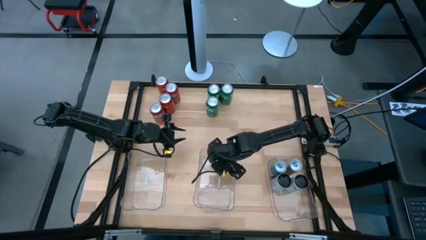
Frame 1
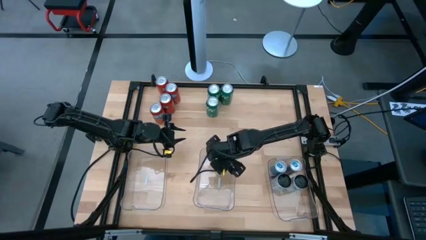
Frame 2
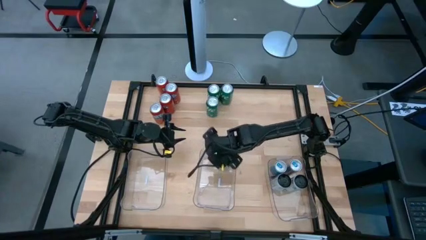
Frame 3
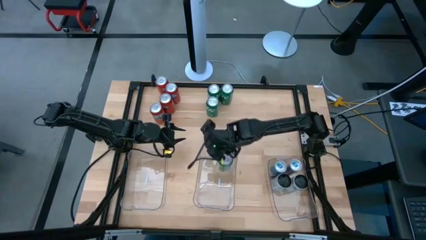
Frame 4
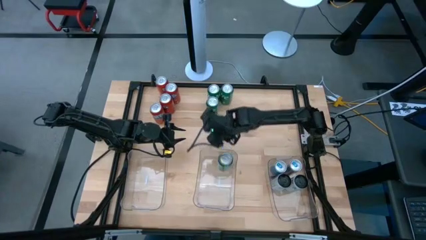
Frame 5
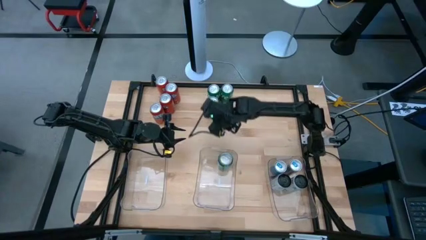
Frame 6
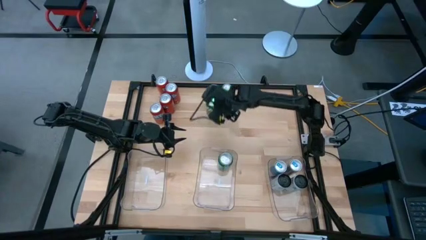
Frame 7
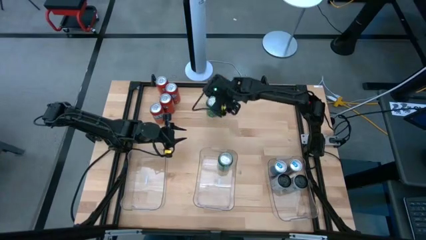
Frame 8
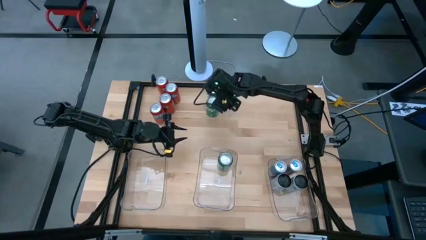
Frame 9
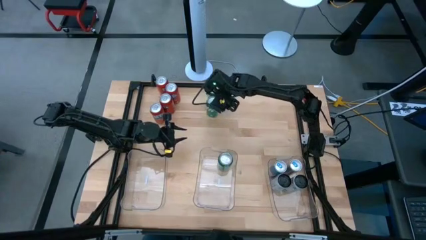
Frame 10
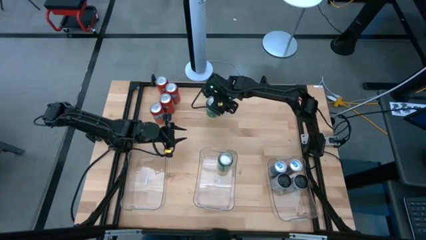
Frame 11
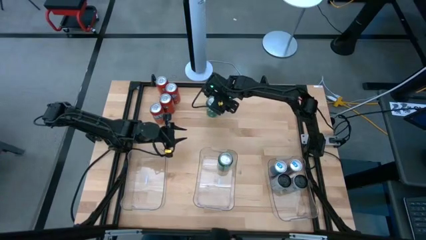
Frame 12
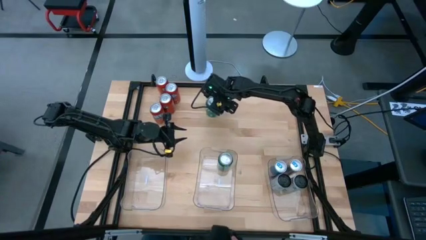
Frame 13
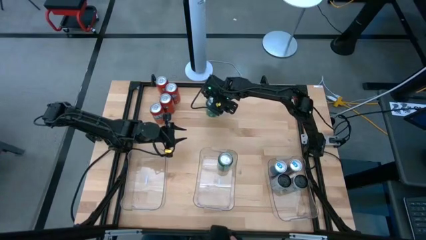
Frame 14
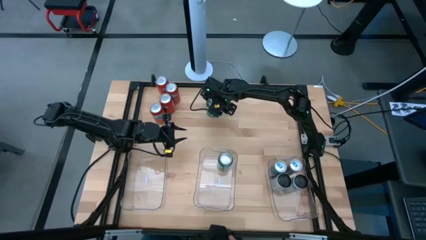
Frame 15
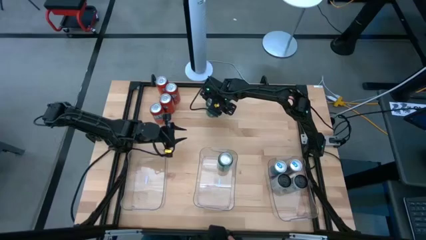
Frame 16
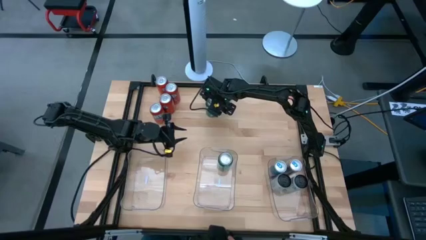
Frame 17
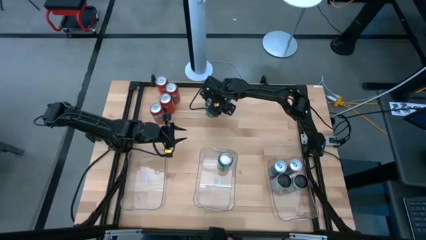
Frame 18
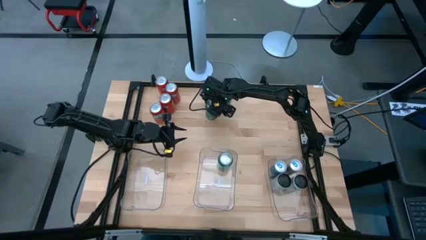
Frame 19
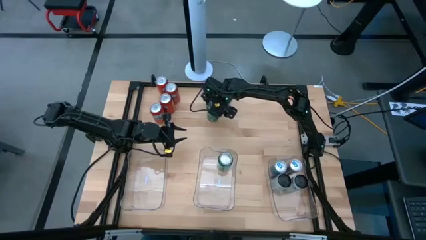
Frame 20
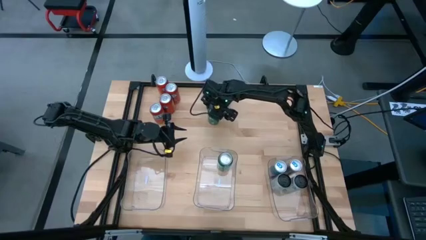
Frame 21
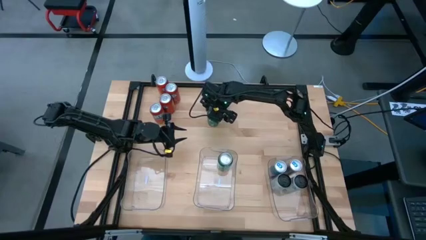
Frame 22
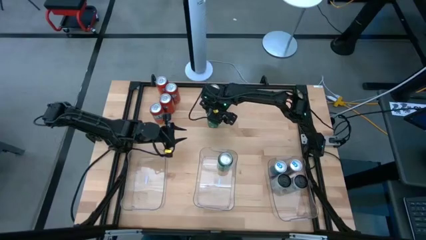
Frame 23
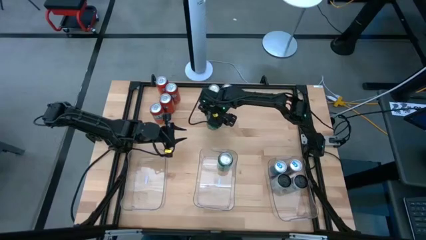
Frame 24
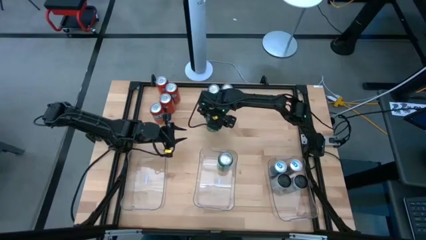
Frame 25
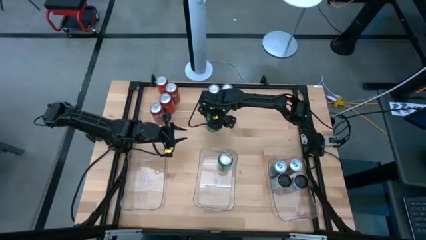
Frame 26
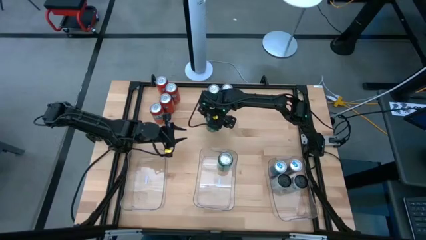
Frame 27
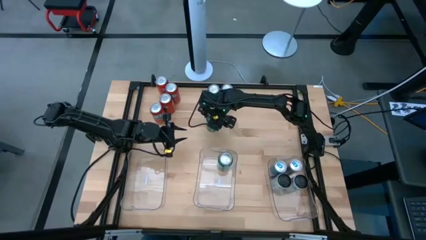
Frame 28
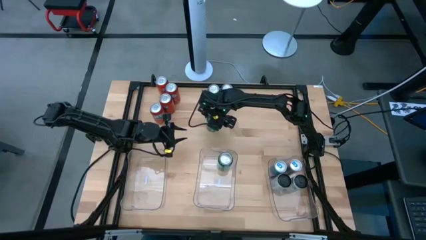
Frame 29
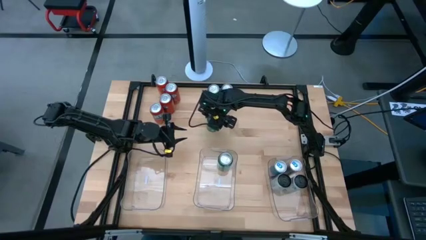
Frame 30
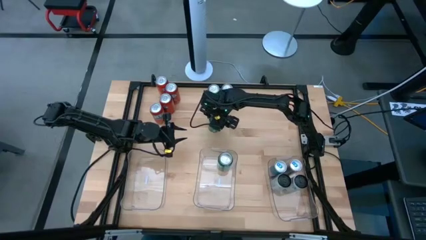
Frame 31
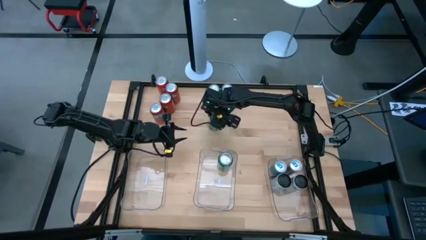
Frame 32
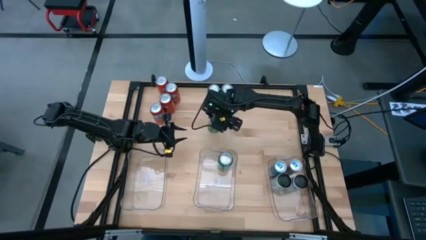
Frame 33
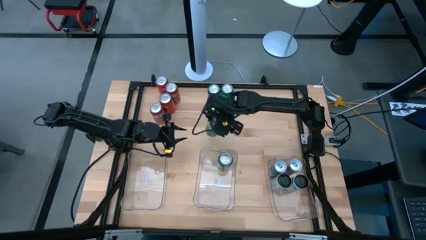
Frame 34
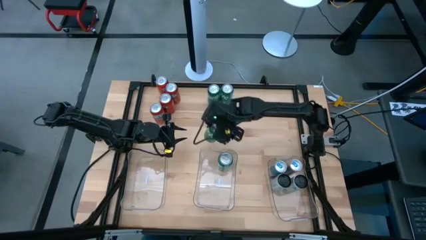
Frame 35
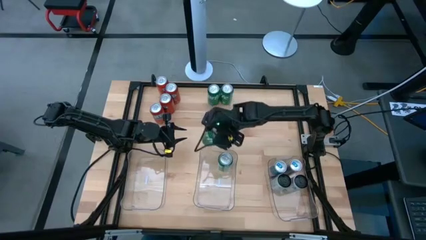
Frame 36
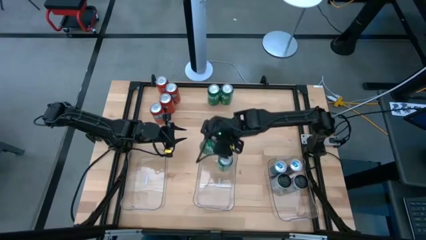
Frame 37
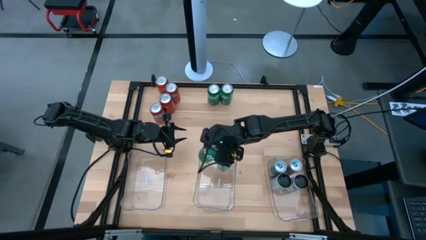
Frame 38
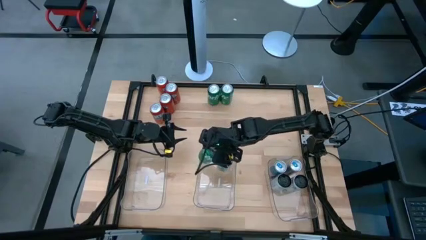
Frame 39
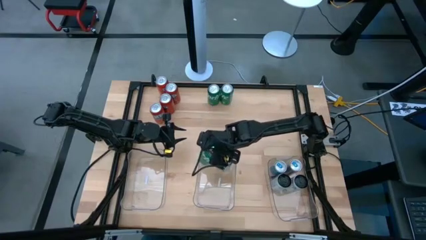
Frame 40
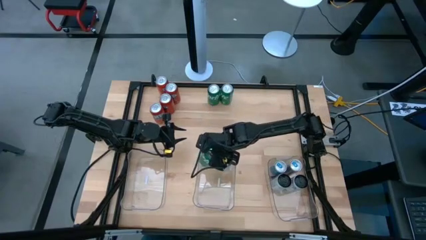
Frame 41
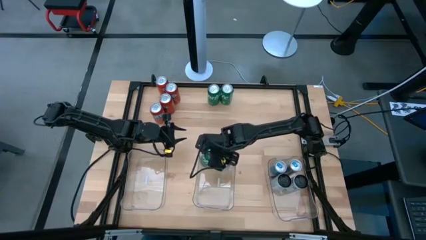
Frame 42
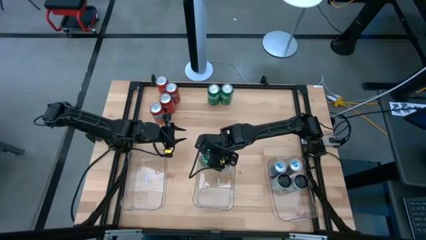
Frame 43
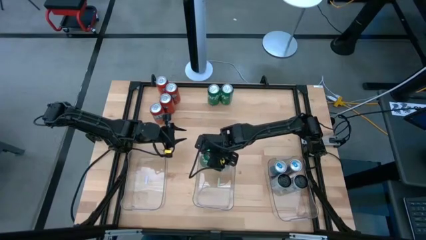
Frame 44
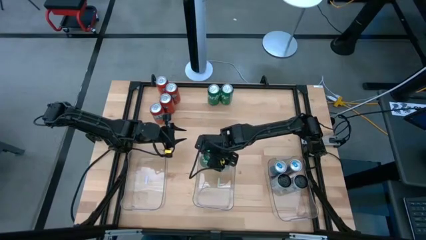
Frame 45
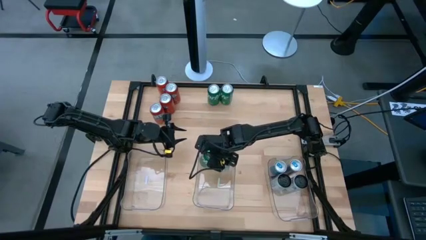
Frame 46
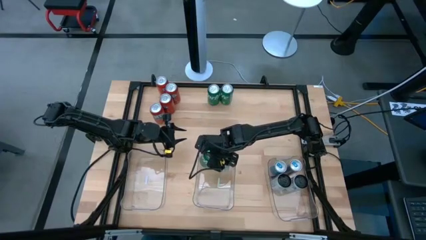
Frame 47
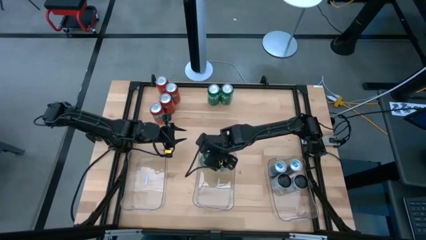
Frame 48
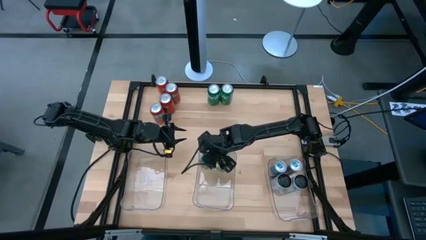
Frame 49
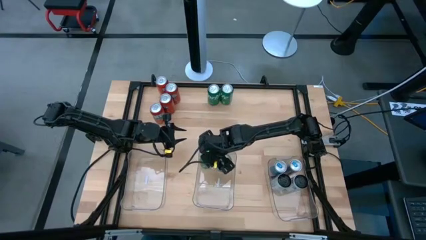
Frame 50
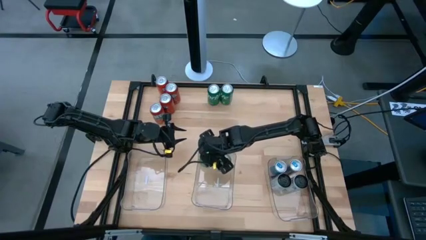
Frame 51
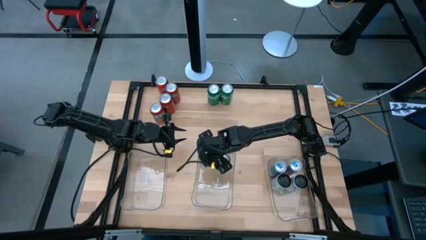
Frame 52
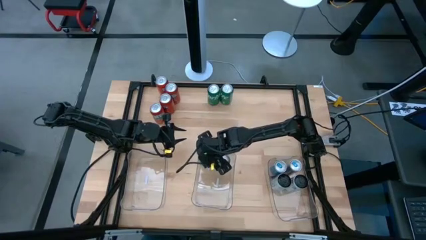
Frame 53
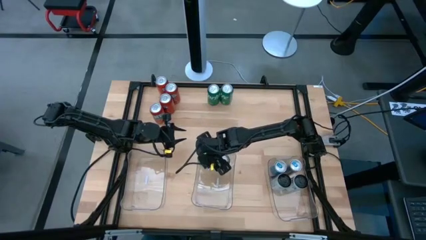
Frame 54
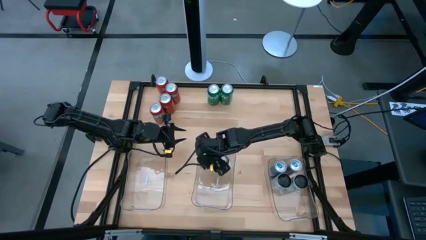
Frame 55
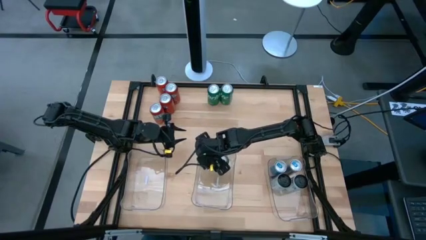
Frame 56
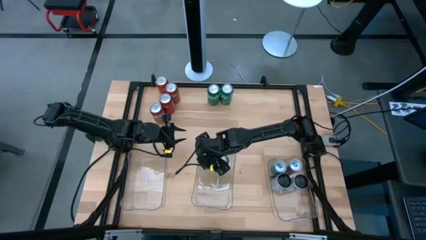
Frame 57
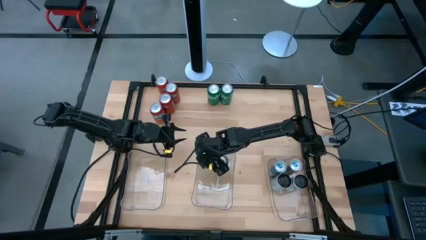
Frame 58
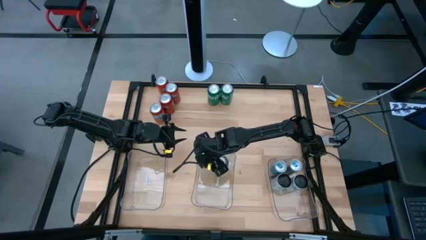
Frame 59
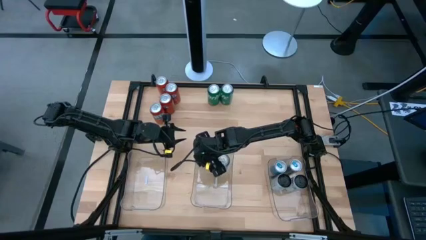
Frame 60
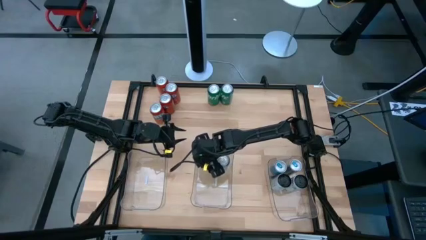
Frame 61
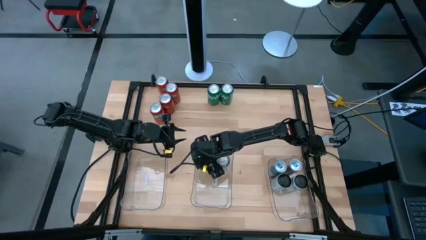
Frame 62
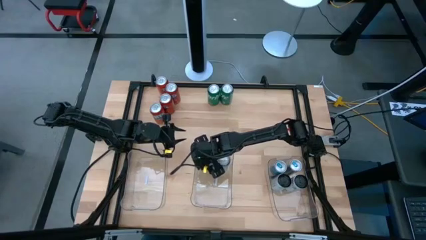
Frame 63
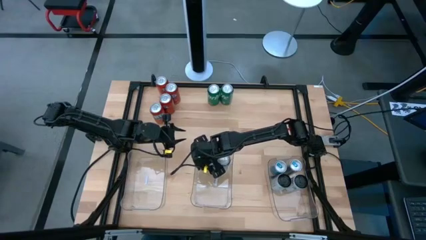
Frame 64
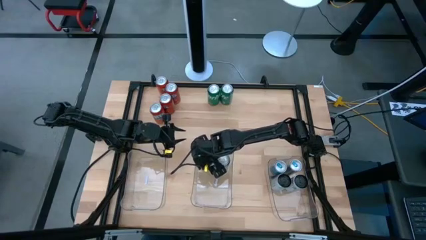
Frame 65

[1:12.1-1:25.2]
Task: Sort soda cans
Put the green soda can into the center transparent bin
